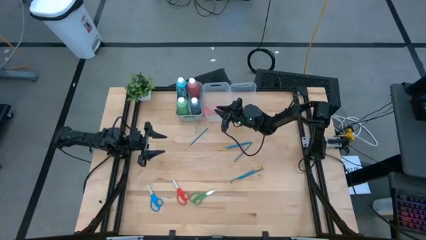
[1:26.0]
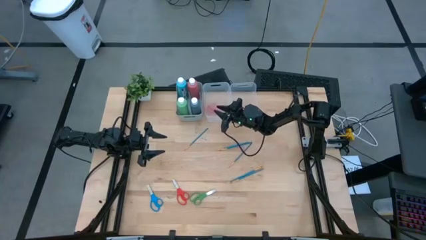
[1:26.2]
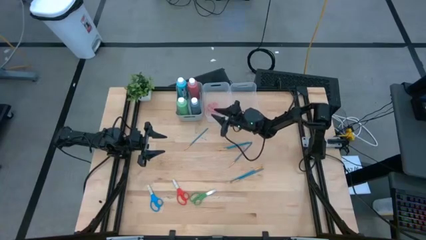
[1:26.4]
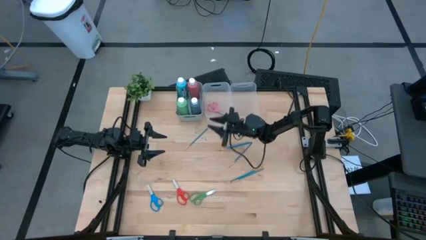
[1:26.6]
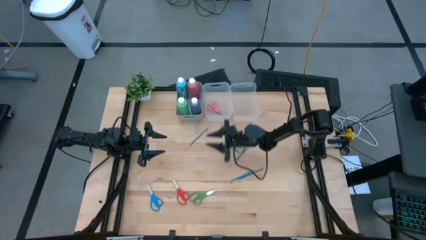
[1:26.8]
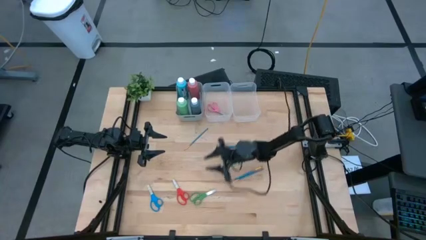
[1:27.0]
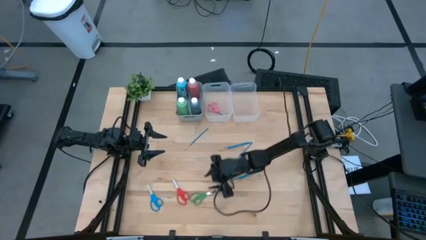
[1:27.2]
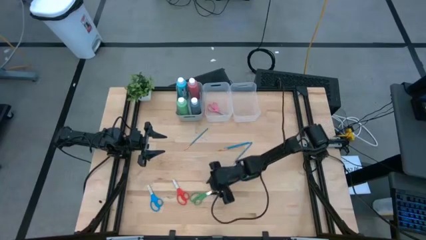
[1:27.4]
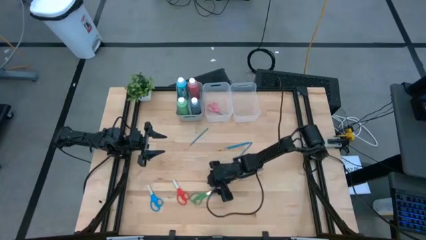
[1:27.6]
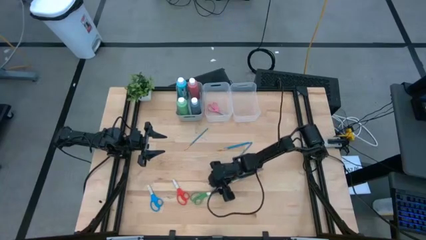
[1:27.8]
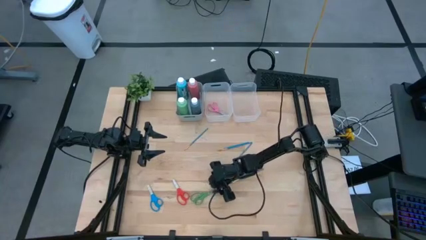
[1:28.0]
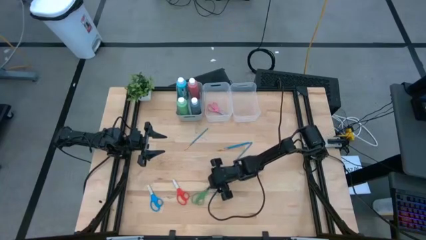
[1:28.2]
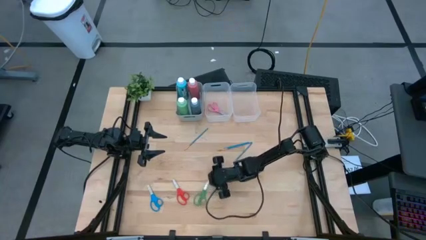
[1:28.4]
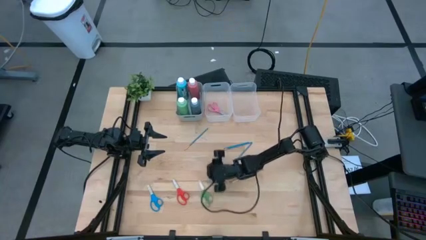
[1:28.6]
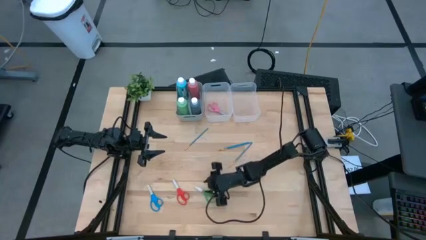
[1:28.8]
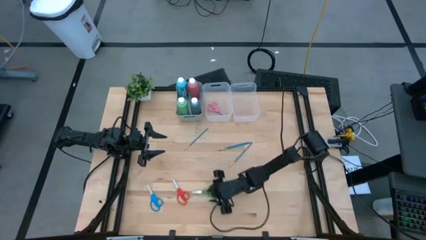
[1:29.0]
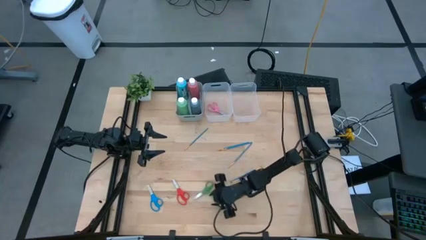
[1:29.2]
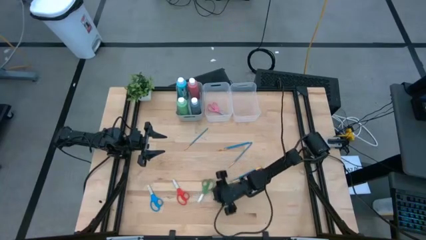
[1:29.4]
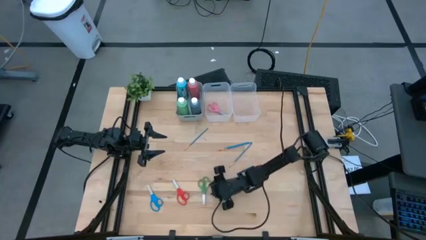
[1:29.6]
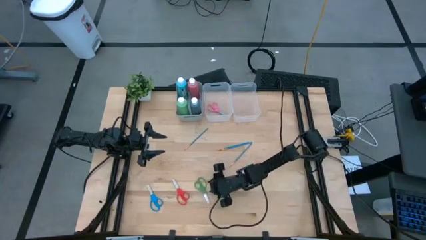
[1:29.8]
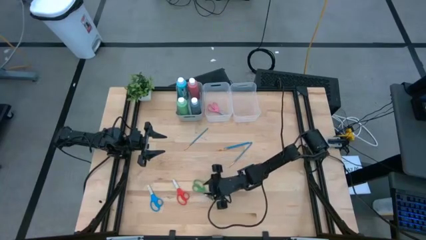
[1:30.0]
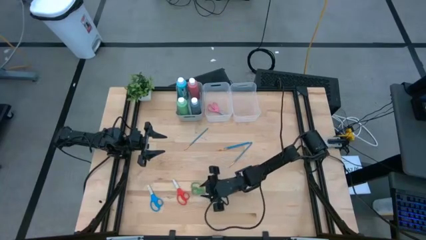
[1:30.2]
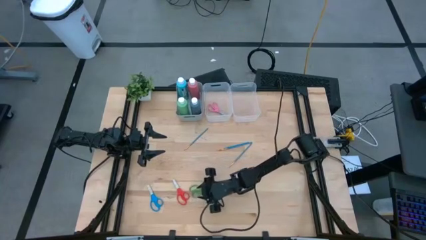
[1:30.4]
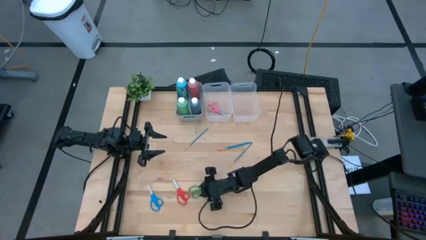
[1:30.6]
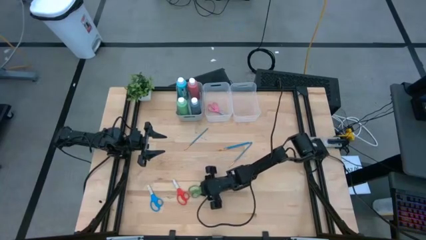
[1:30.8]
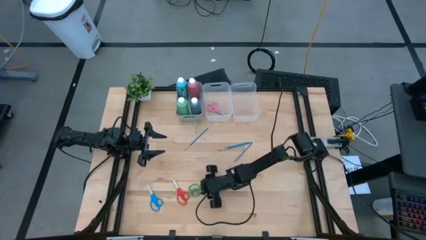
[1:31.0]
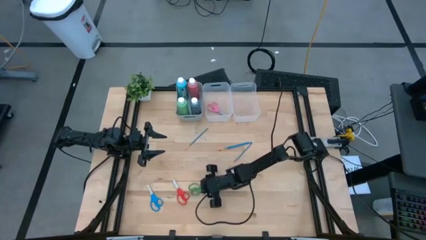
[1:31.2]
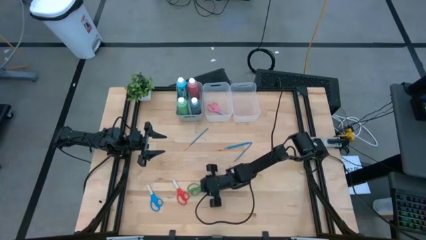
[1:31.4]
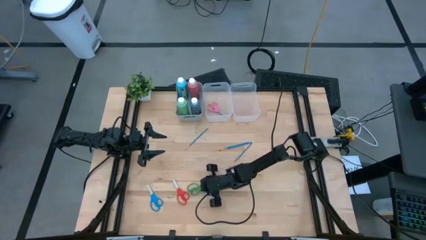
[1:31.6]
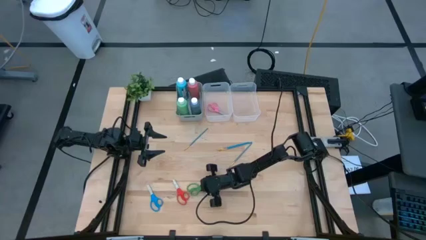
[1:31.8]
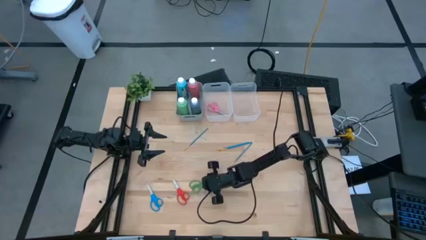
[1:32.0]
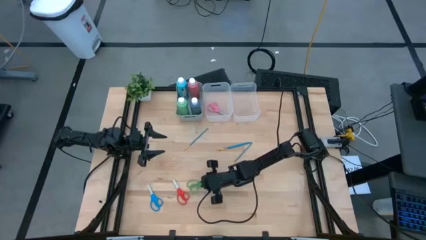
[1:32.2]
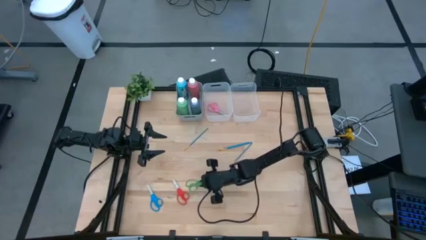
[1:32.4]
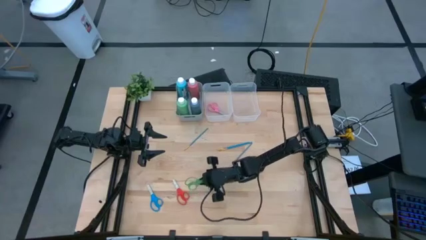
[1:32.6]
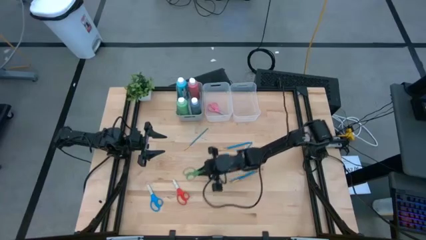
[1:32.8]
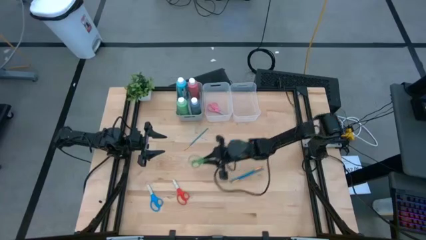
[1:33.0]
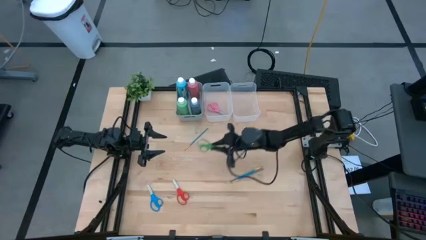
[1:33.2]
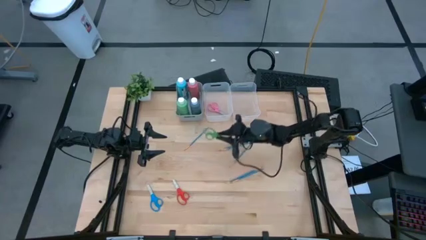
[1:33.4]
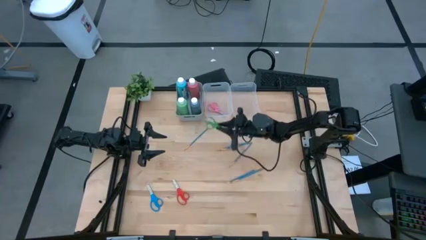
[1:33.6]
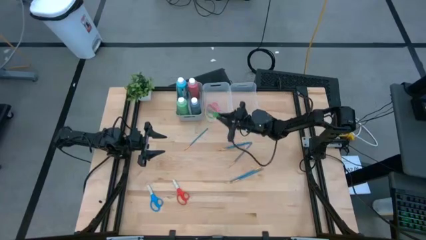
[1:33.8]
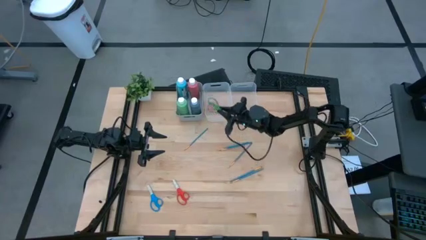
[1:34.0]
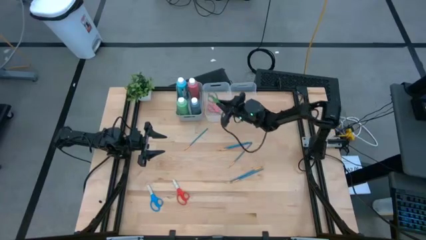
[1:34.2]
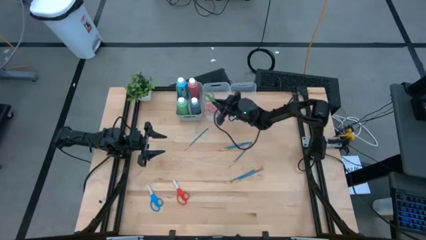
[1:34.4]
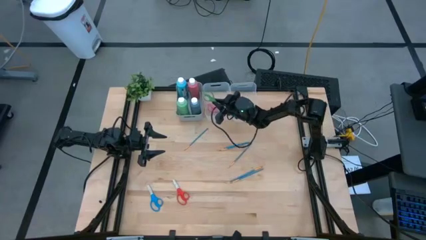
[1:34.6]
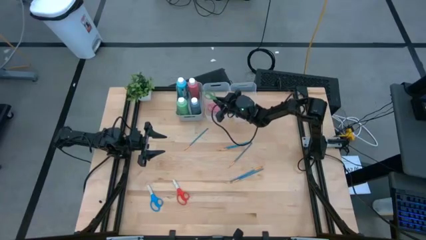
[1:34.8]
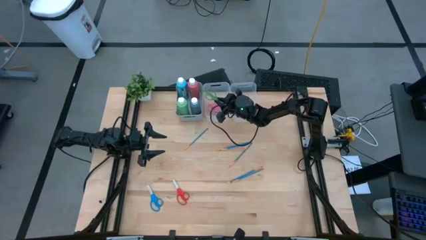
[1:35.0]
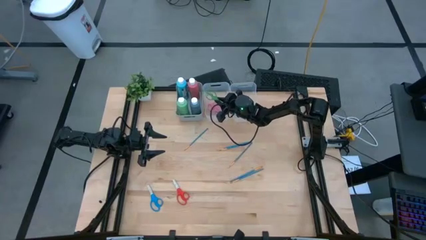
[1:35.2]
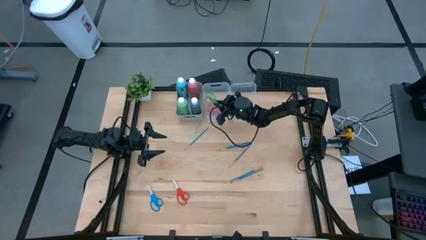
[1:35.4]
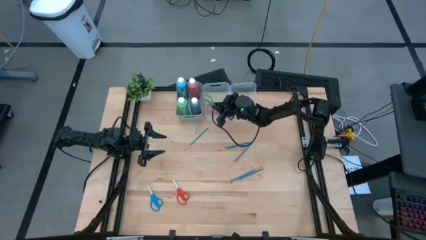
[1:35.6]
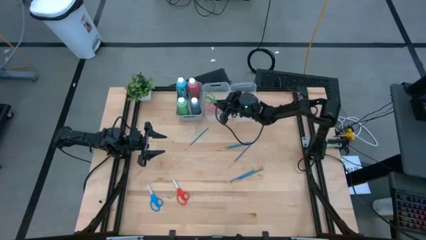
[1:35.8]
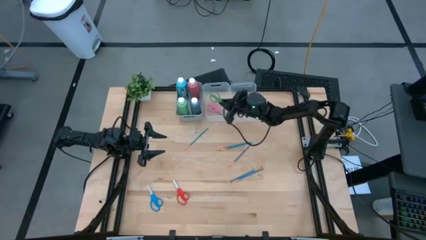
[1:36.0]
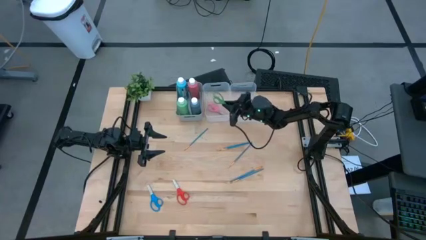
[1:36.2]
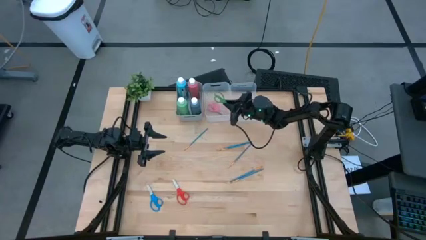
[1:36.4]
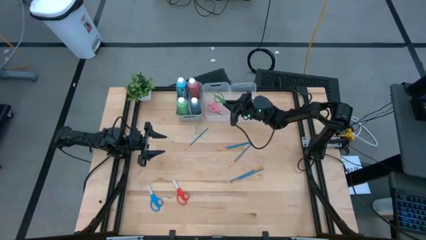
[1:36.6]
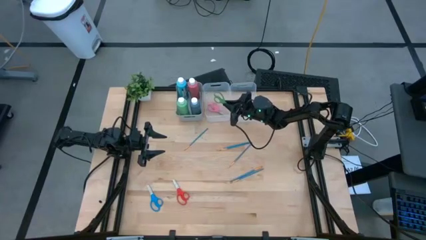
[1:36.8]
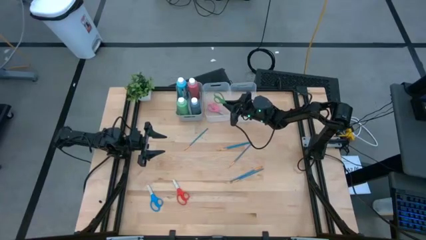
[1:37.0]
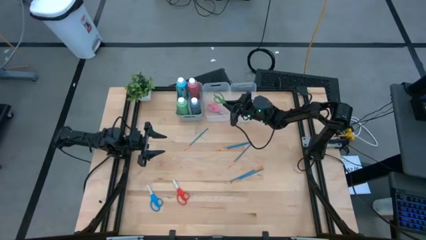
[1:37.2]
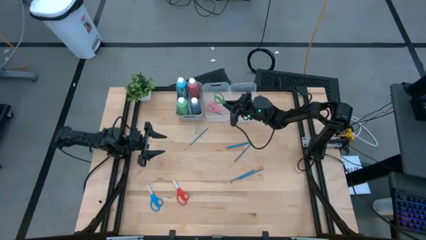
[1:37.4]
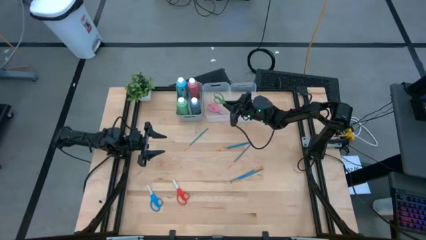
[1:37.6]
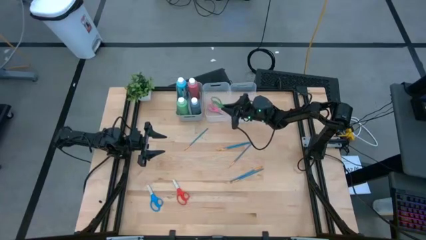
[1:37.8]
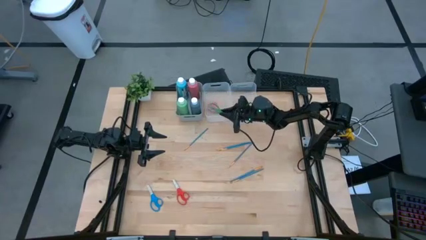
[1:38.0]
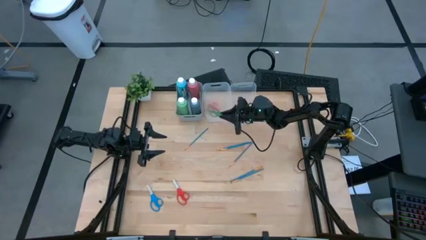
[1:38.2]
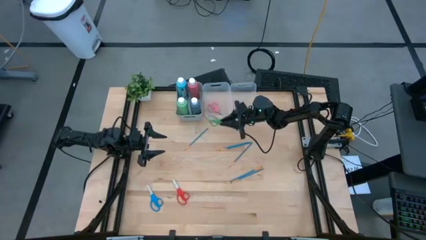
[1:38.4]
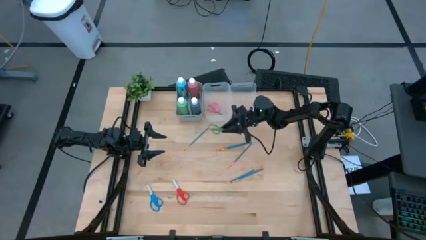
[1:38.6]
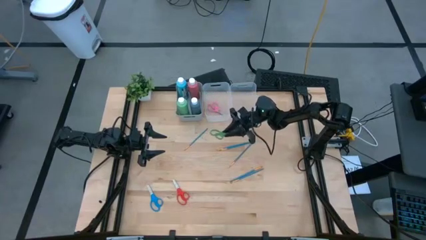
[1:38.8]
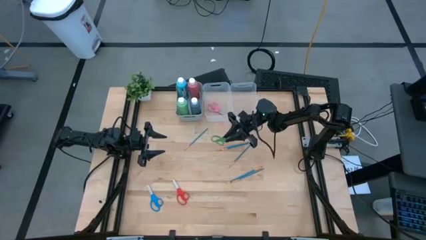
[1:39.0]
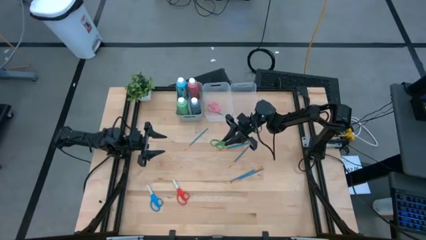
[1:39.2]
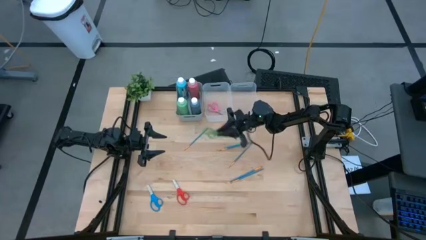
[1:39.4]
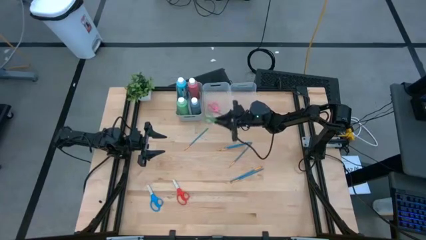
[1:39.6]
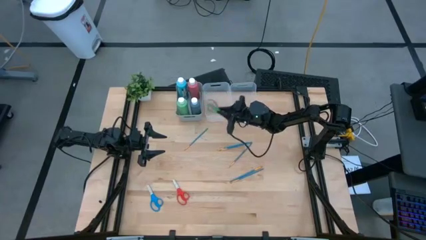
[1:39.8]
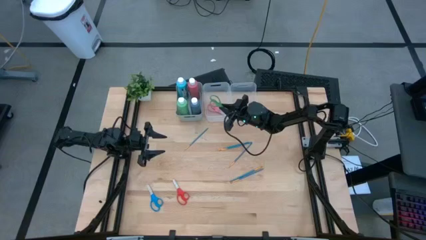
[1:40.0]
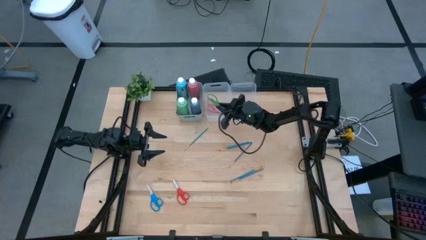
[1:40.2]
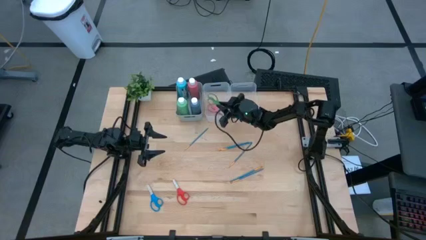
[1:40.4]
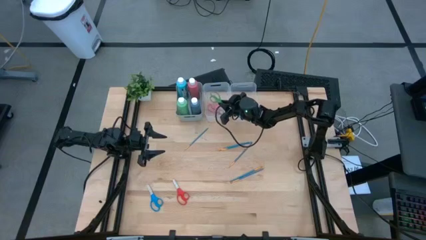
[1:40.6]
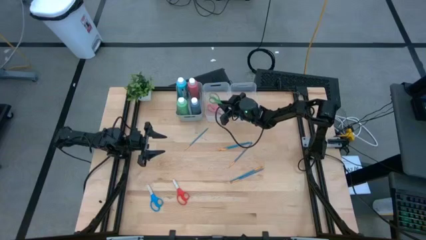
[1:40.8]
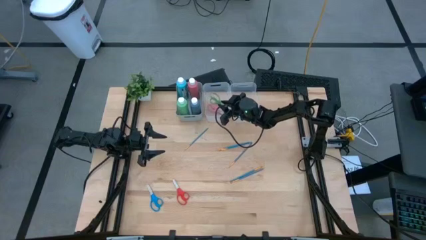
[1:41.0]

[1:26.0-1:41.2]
Task: Pick & Place Paint Supplies
Put the green scissors into the left transparent bin
